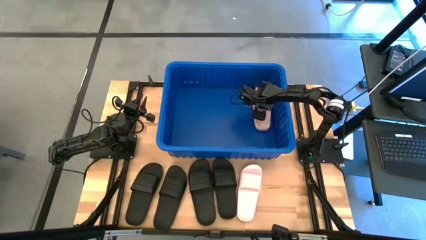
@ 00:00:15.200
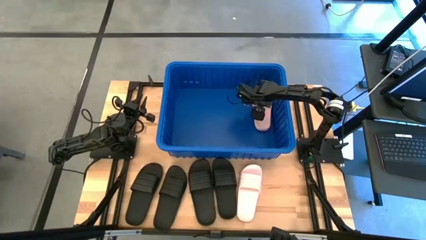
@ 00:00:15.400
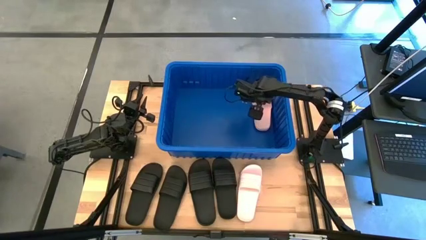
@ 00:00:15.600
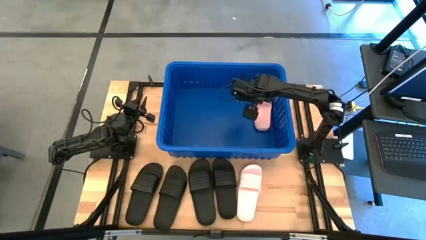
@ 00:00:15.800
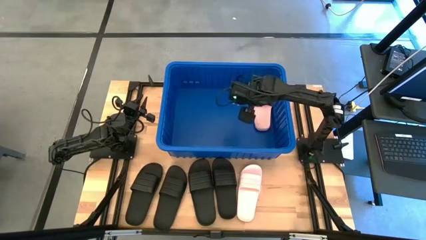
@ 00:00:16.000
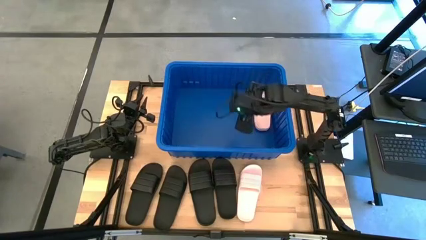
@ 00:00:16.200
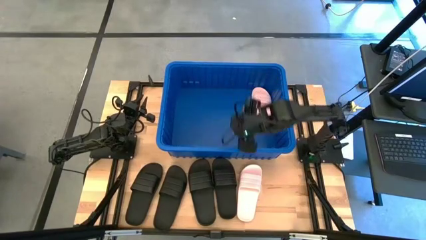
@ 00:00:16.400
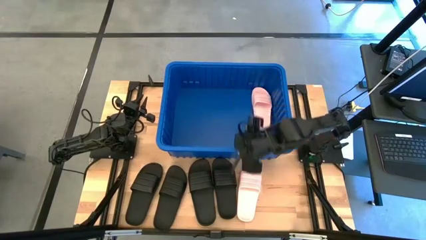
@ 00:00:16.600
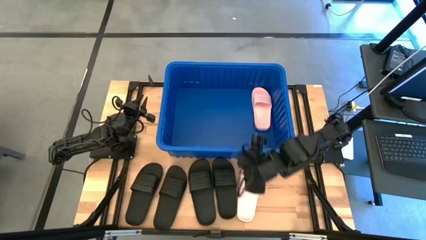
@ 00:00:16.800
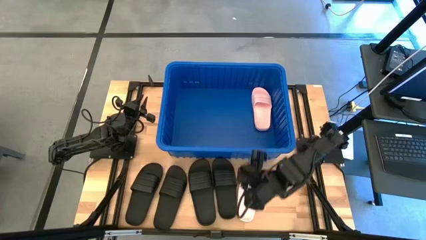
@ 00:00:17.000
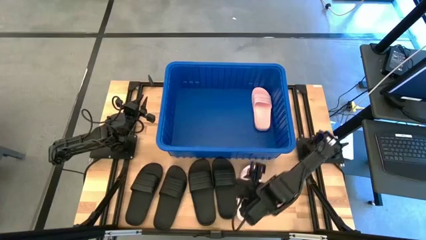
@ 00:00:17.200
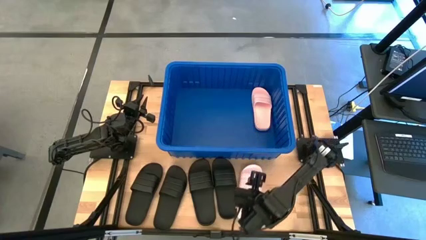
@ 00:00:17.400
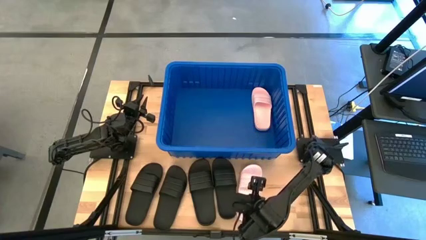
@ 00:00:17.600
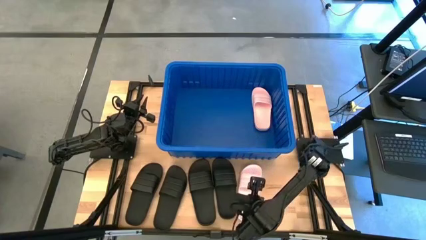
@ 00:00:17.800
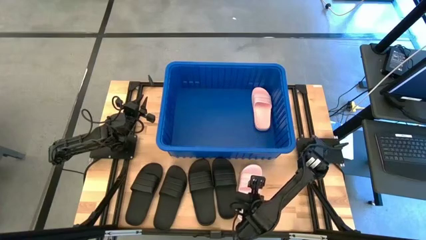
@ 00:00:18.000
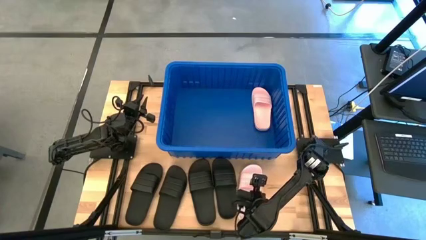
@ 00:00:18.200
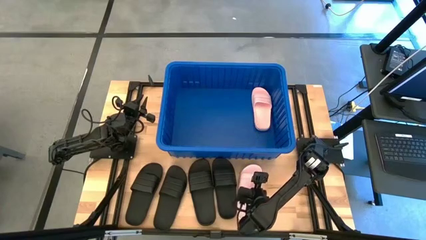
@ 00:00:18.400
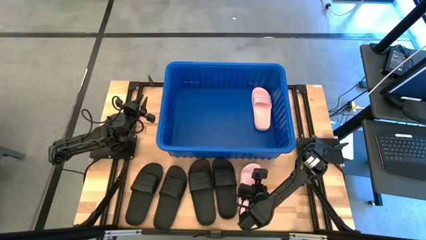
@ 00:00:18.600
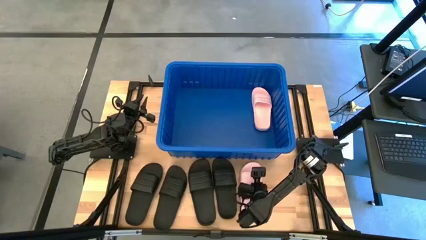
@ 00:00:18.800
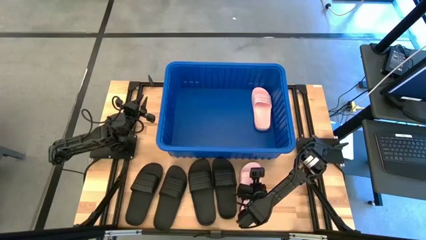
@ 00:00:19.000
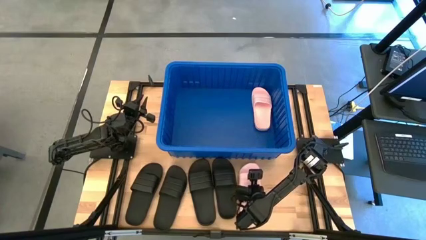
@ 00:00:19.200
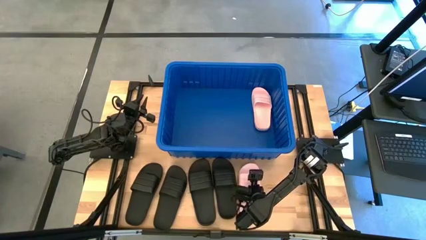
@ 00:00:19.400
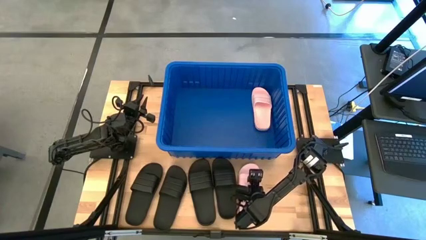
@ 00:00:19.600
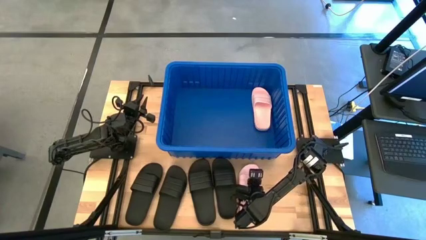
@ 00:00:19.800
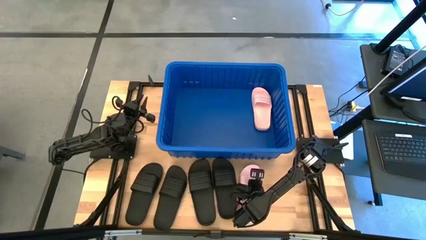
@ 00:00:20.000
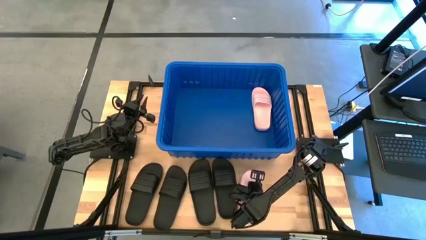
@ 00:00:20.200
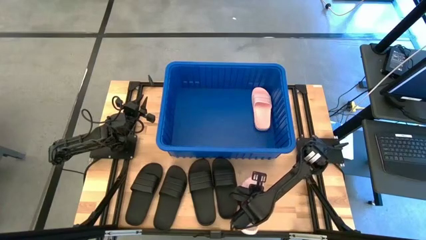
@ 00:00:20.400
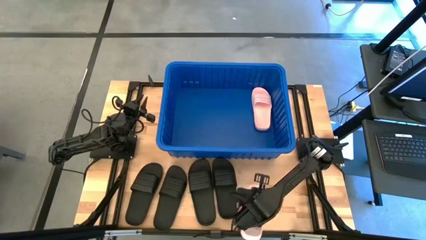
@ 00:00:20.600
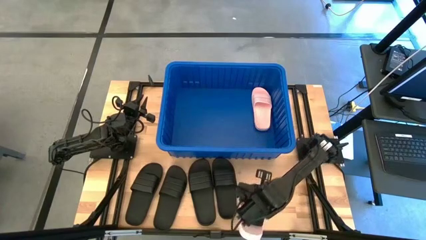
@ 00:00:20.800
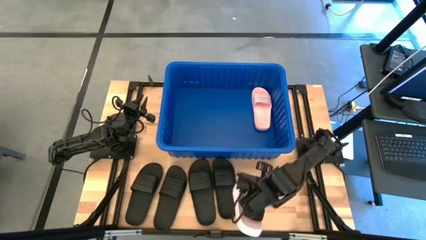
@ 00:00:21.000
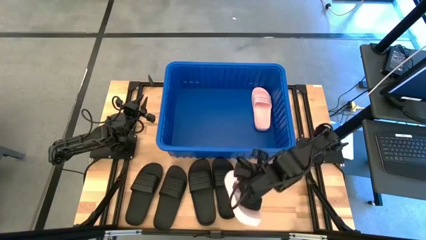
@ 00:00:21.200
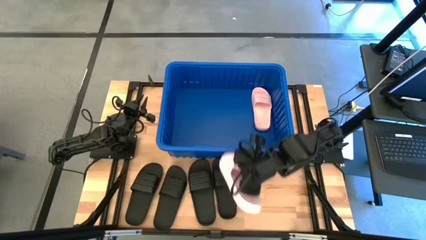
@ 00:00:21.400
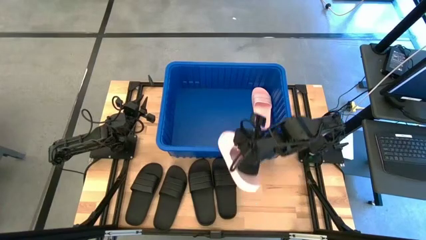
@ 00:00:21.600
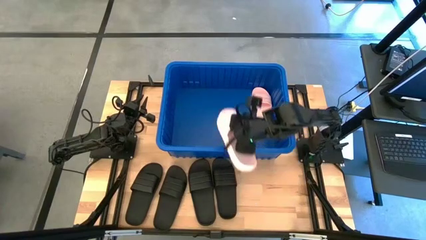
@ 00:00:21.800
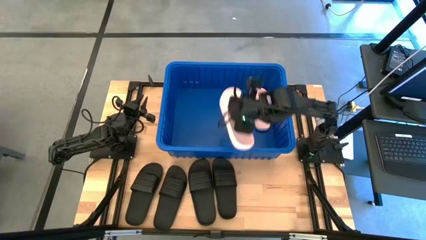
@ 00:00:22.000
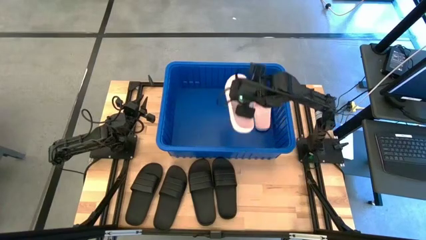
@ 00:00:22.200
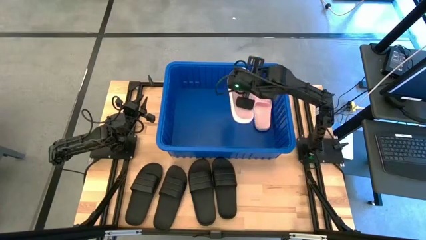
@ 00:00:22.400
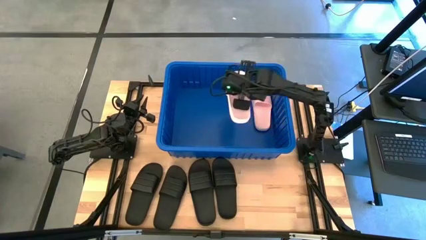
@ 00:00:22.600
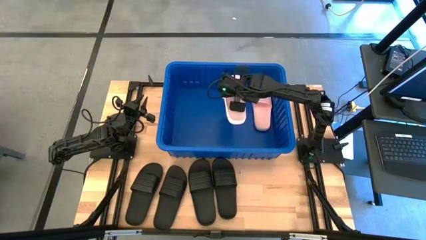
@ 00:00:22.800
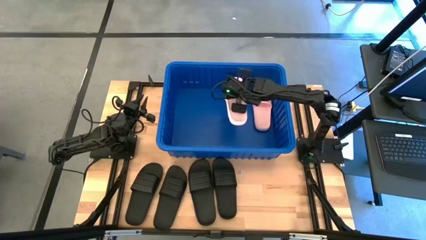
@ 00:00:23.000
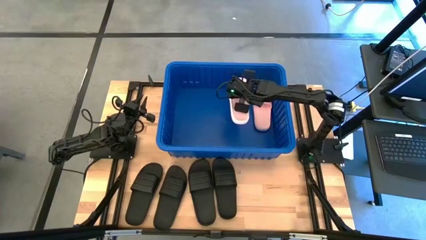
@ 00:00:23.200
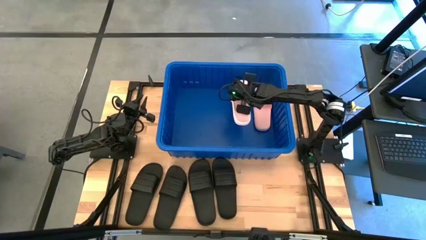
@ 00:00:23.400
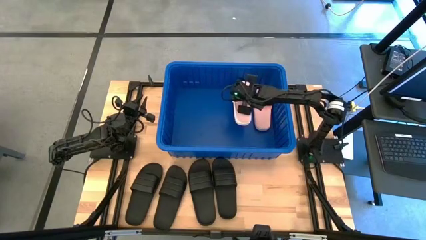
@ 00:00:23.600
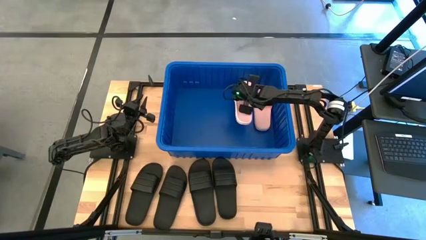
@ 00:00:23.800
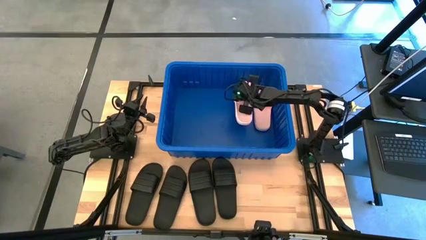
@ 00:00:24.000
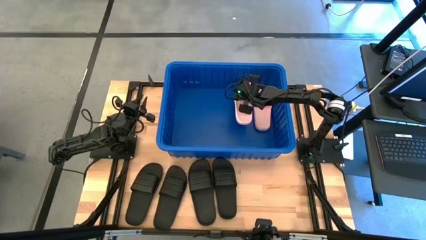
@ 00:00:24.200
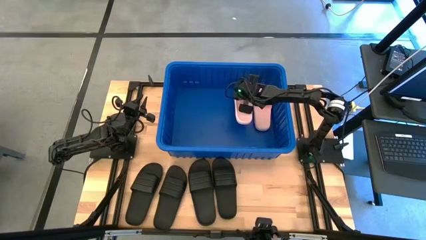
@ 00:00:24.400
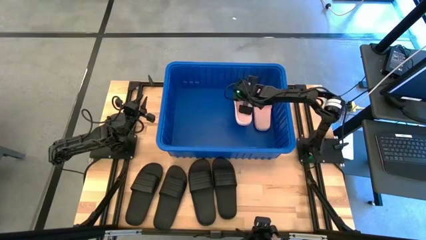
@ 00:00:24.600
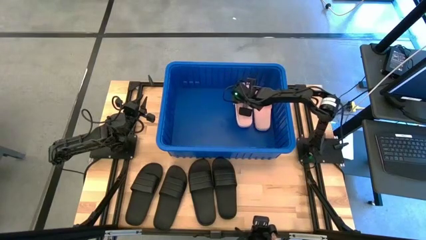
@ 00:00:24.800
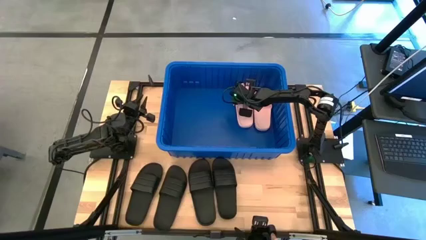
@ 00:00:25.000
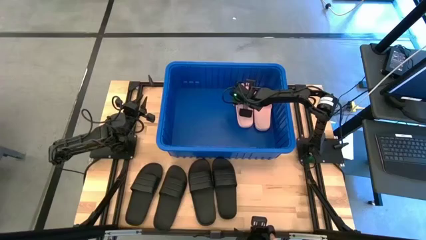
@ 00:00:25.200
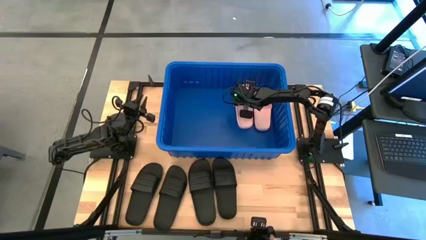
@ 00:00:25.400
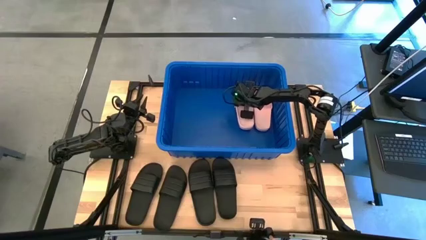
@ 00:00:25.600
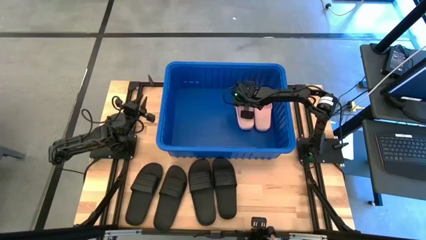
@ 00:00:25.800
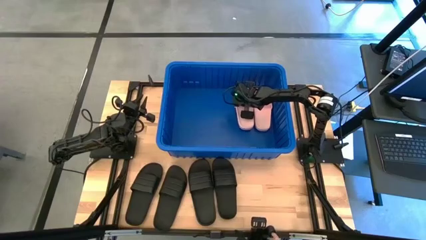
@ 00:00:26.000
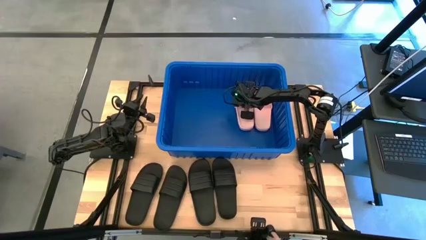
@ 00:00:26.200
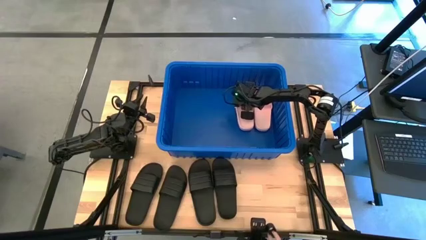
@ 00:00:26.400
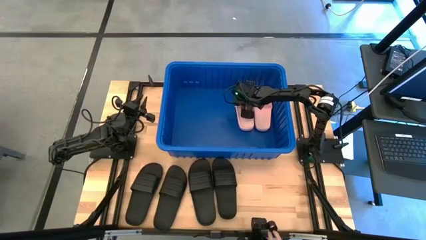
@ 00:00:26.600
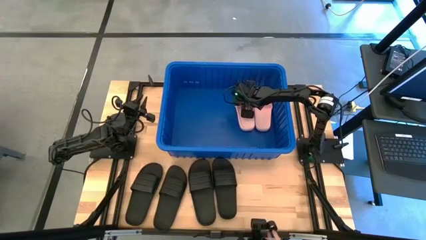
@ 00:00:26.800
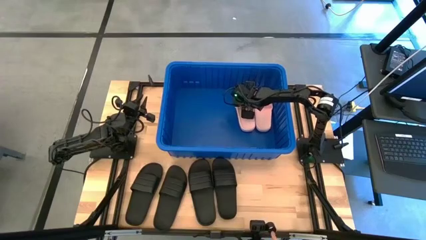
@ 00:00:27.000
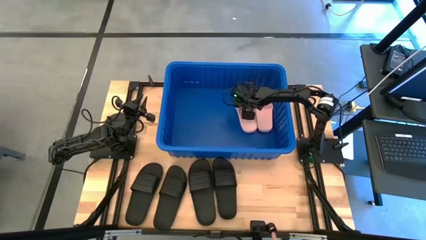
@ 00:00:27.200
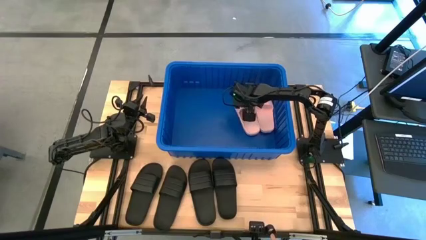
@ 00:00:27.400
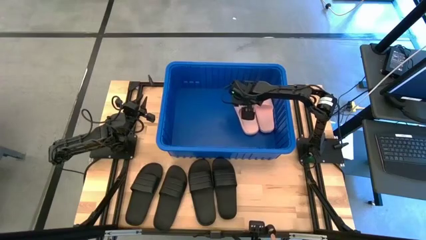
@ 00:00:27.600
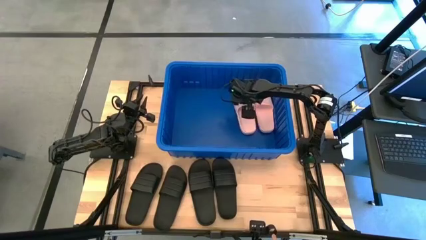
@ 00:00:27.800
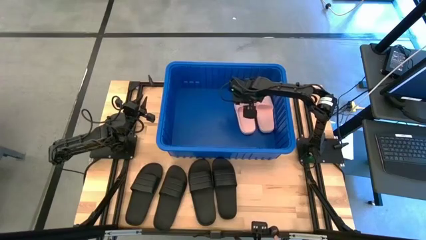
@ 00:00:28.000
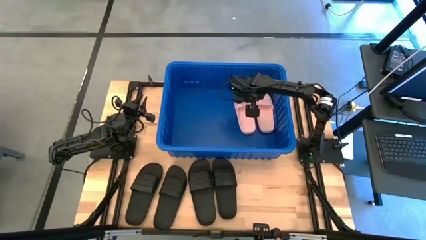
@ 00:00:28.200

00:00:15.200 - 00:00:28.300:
Task: Pick and place slides into bin
Put the pink slipper into the blue bin
